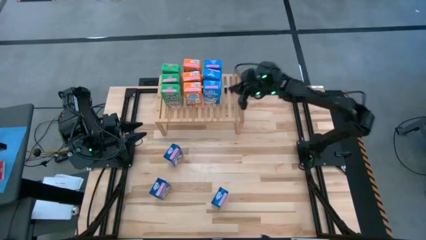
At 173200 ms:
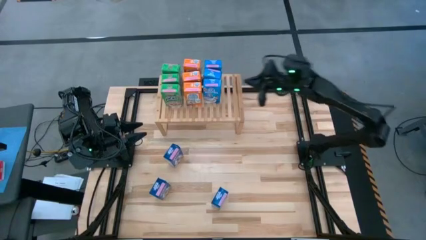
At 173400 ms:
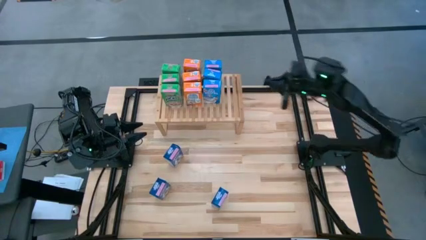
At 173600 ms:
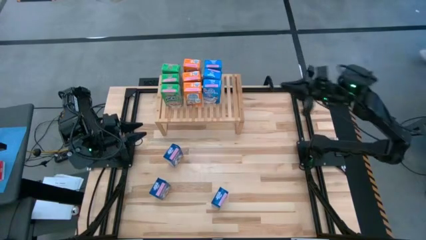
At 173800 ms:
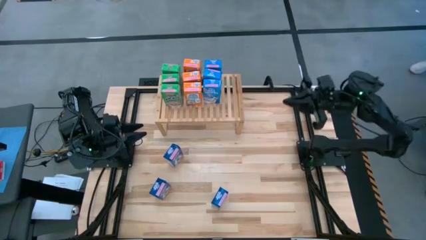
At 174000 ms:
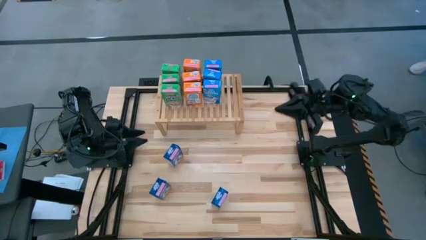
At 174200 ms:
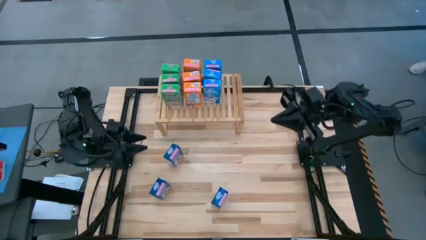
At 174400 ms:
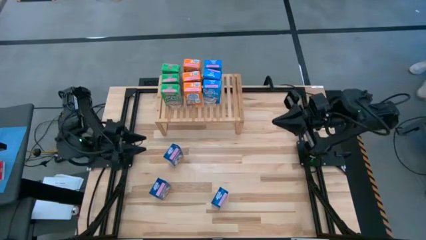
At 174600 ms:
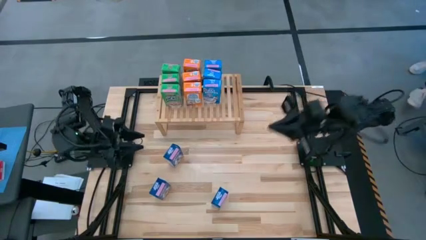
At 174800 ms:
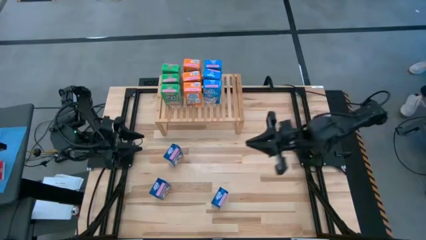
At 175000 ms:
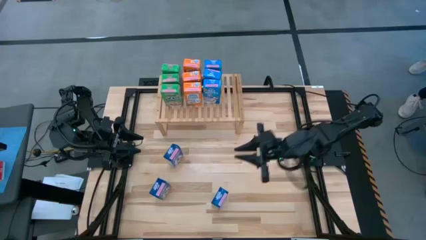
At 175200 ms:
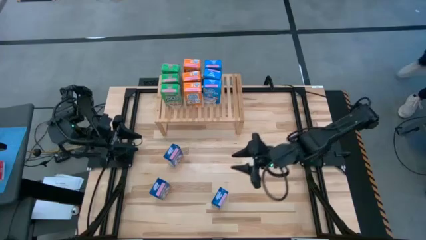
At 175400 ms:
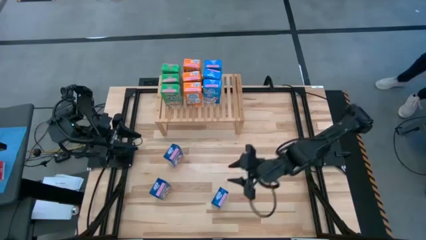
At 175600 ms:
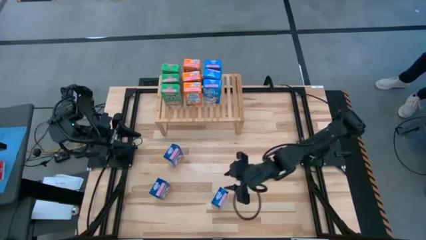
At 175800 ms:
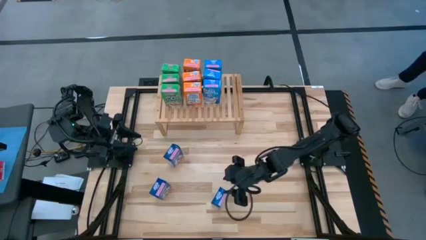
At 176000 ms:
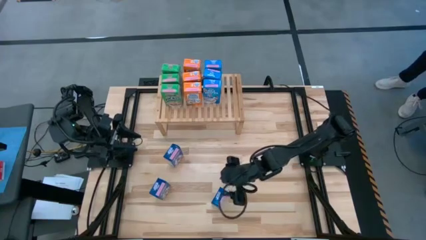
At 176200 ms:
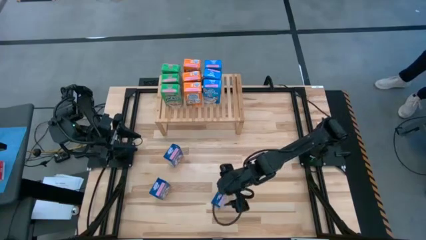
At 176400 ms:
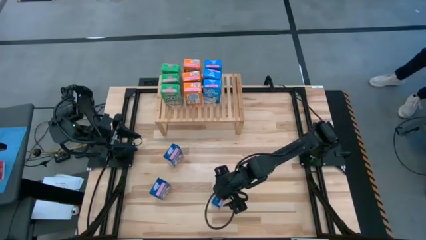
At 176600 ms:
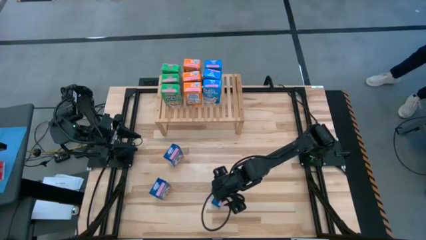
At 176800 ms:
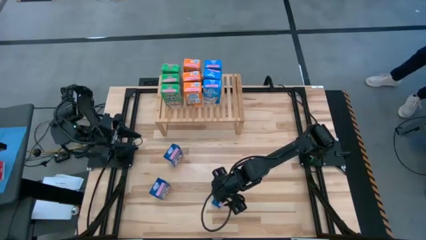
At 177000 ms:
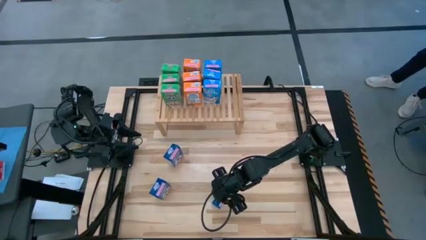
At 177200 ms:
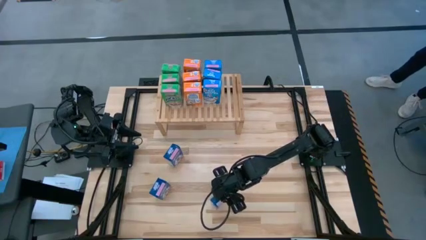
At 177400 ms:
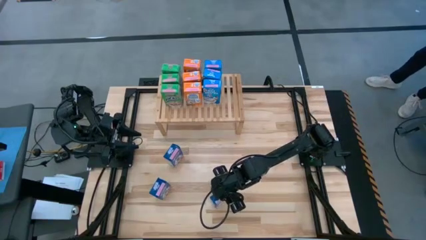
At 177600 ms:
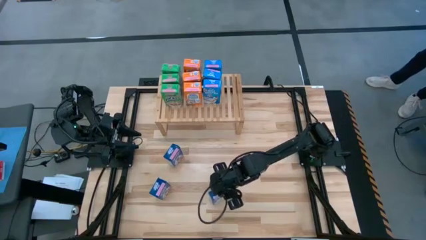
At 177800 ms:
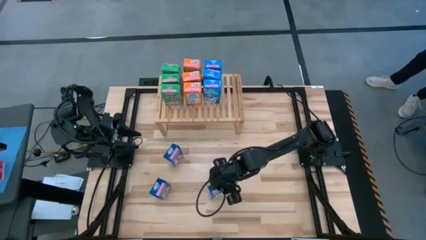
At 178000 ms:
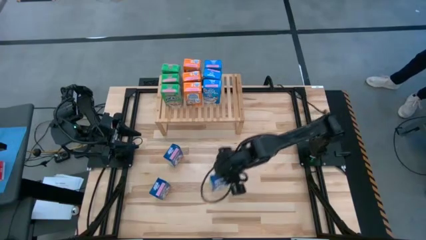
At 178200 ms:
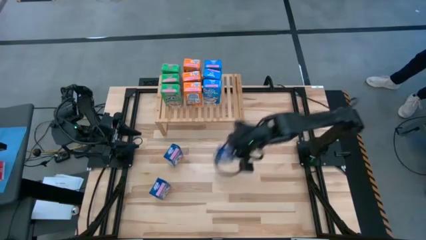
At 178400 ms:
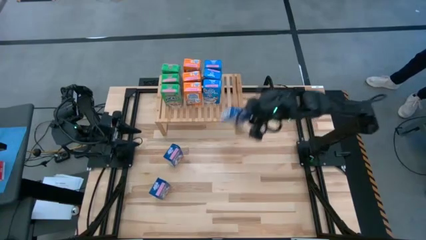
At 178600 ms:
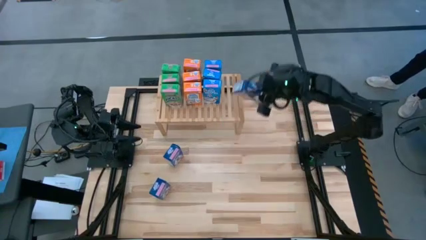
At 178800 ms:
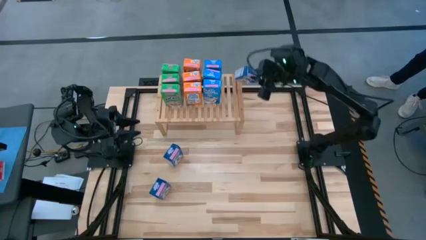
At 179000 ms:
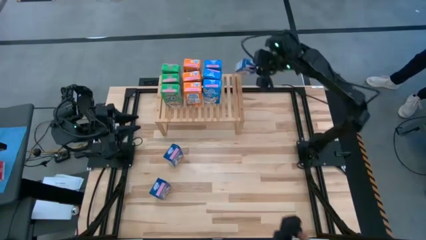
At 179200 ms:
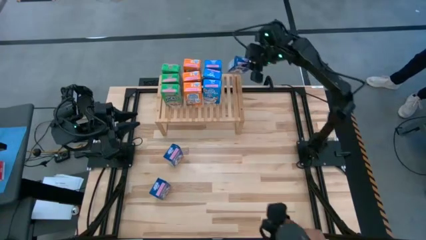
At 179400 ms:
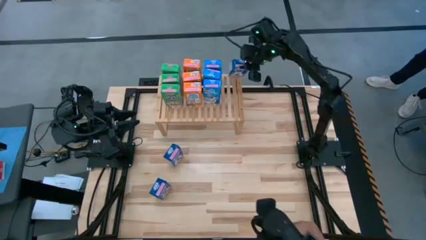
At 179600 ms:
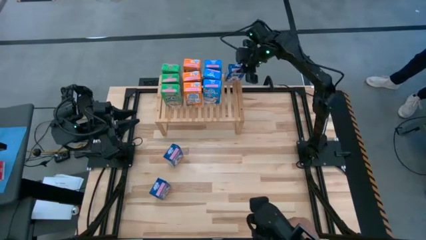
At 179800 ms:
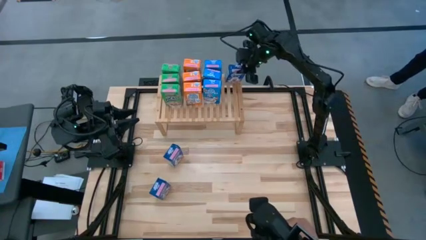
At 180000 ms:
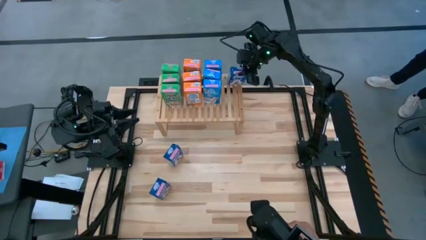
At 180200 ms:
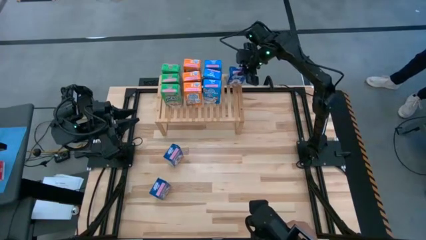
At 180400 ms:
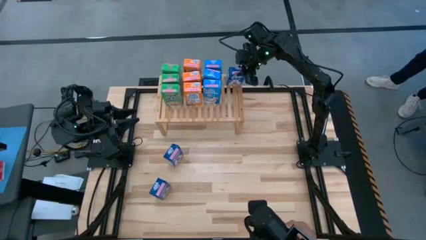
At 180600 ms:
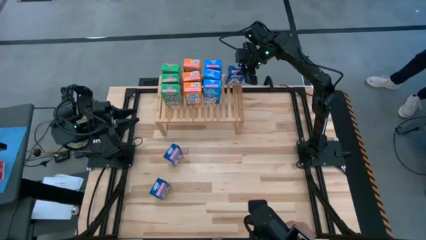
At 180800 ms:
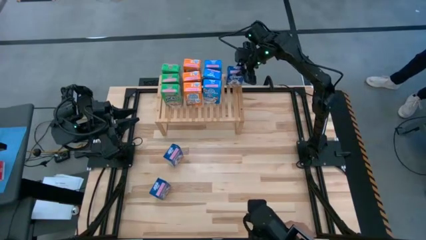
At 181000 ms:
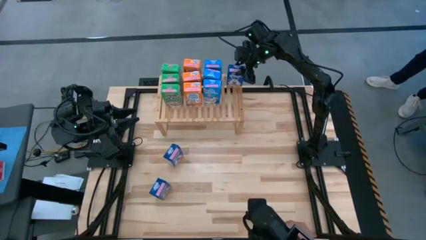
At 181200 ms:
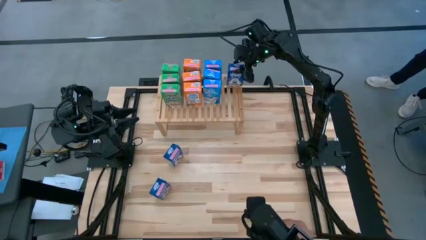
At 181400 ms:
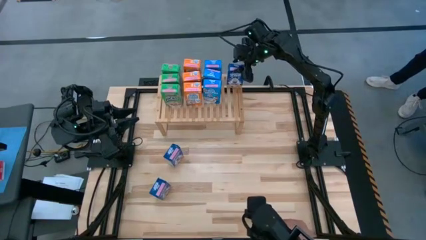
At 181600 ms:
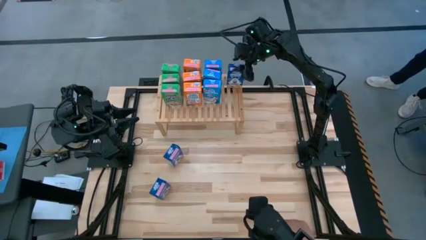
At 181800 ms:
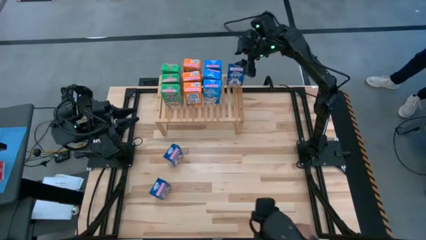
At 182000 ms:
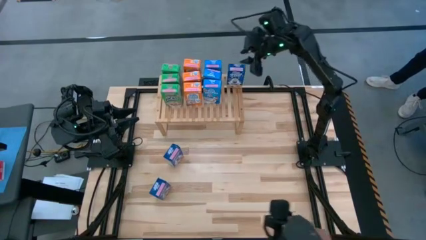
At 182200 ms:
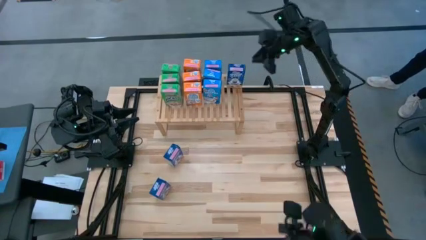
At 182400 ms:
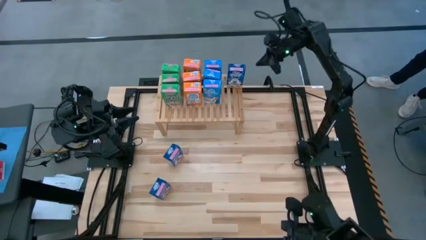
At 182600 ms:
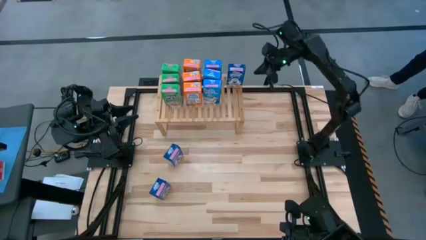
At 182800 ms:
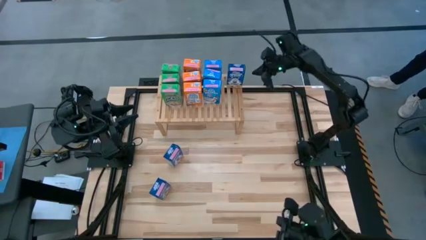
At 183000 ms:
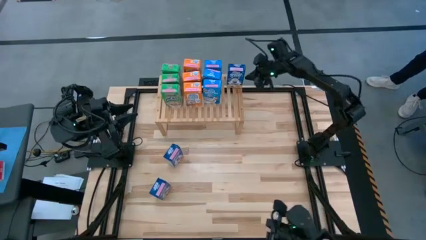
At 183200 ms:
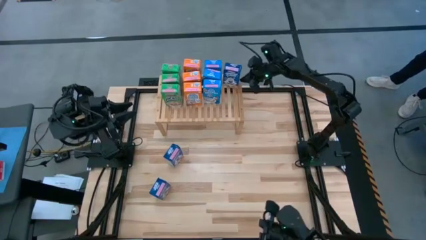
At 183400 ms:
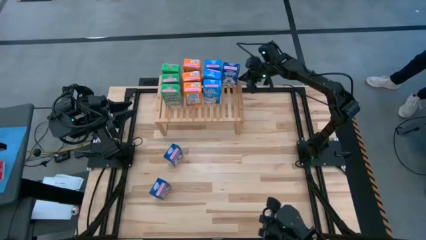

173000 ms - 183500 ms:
Task: Stack cereal on shelf
Put the bottom right blue cereal box on the shelf
